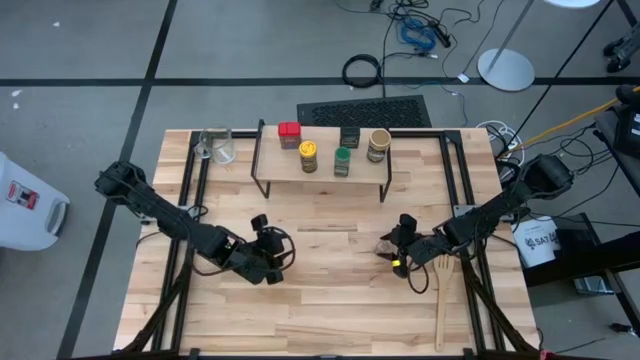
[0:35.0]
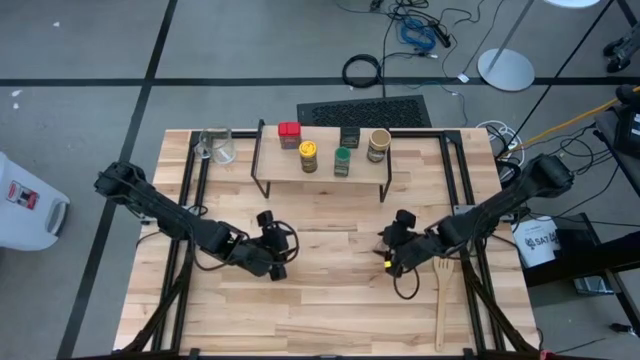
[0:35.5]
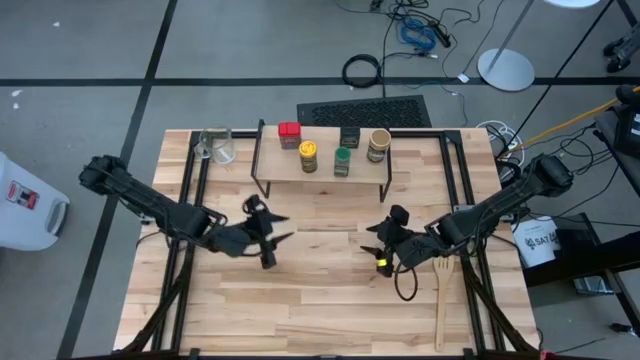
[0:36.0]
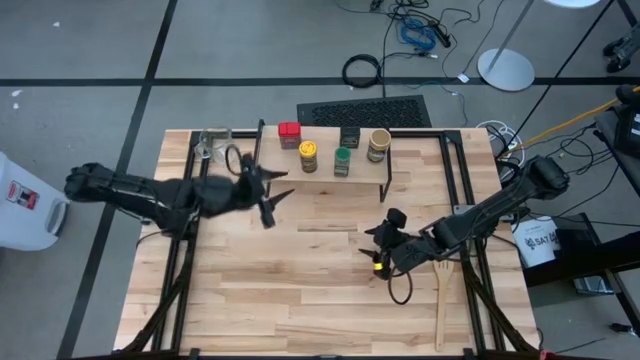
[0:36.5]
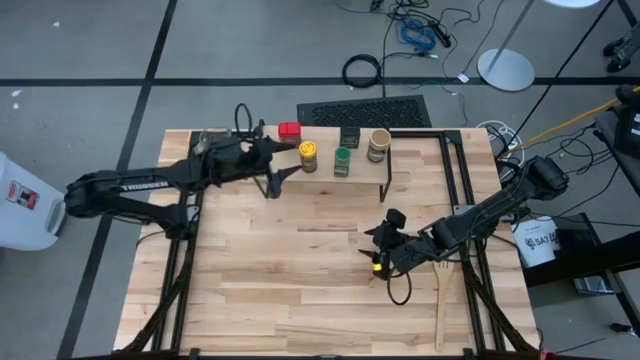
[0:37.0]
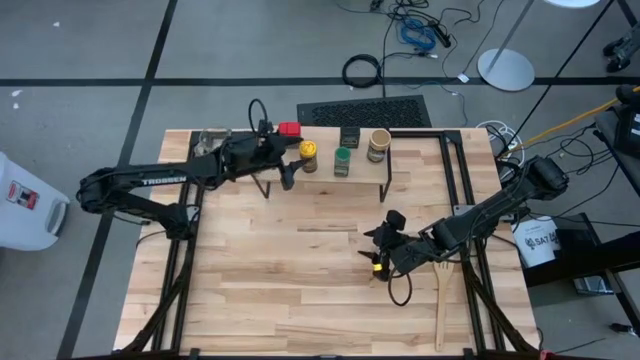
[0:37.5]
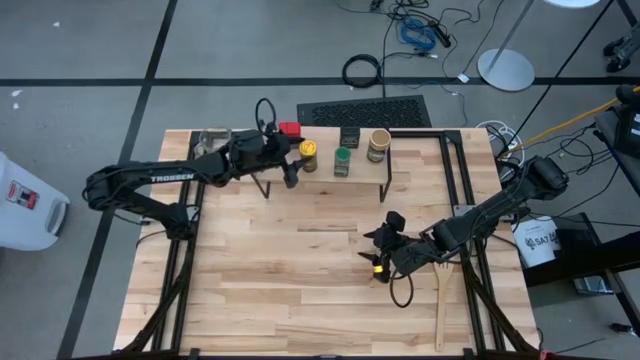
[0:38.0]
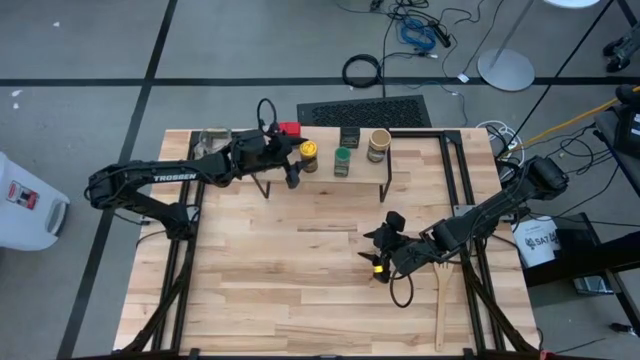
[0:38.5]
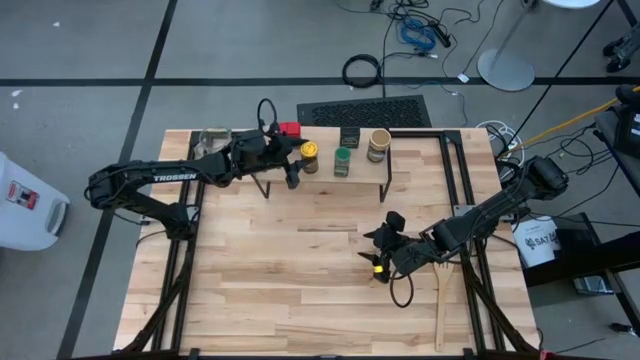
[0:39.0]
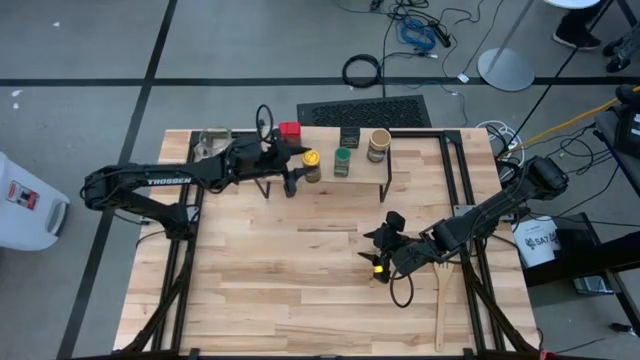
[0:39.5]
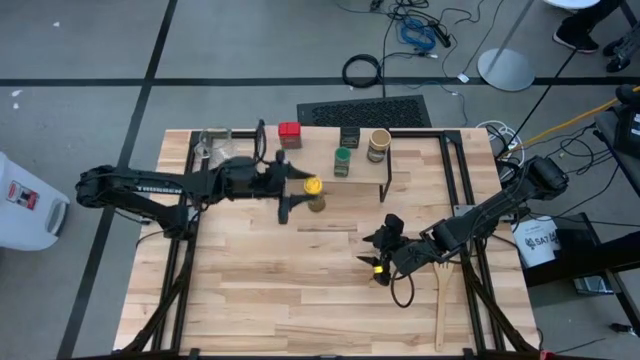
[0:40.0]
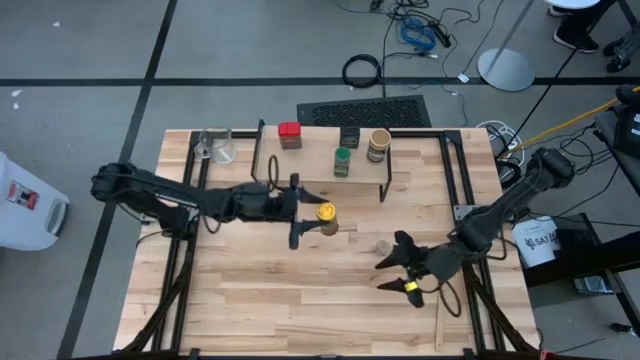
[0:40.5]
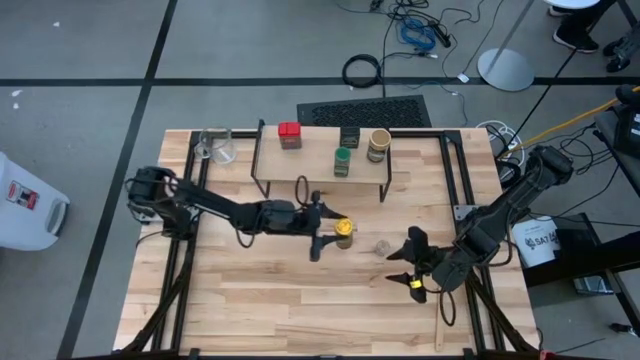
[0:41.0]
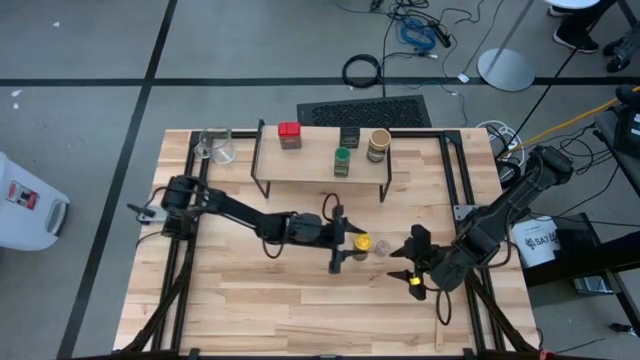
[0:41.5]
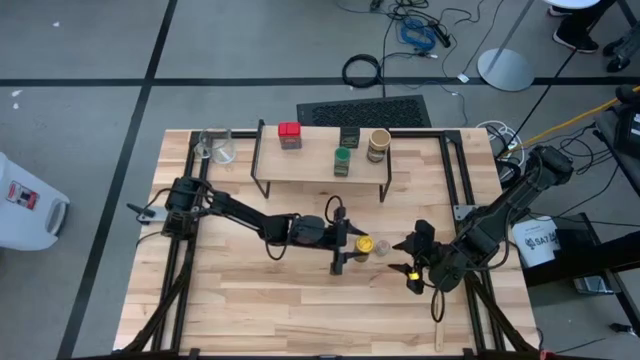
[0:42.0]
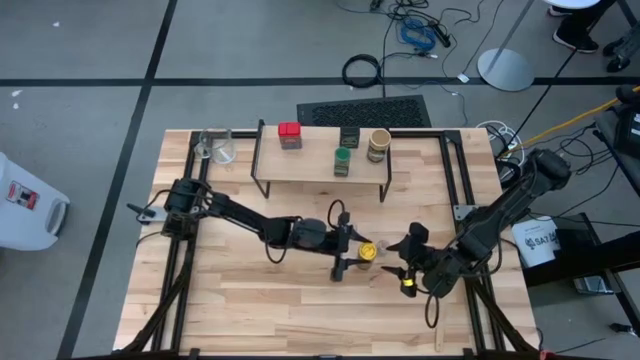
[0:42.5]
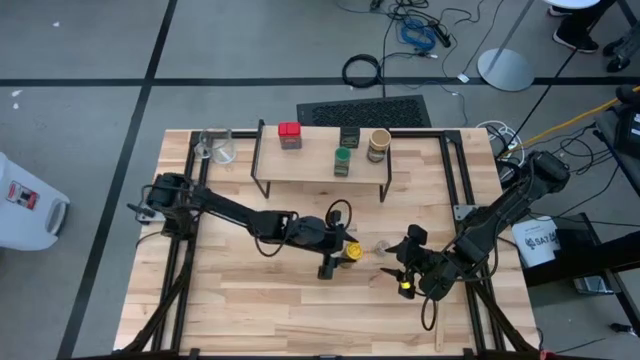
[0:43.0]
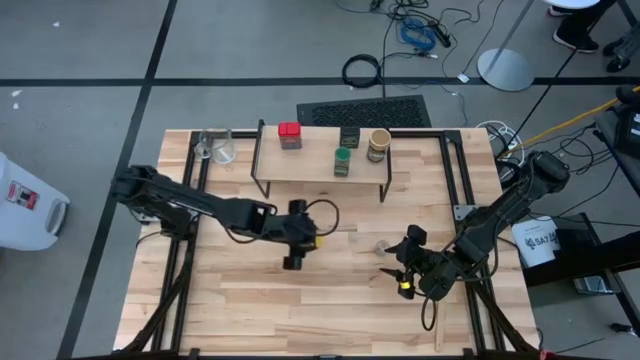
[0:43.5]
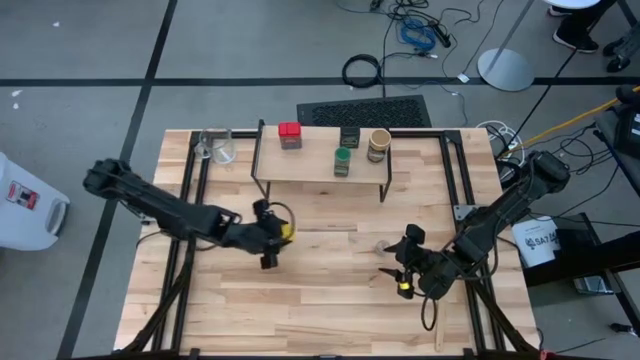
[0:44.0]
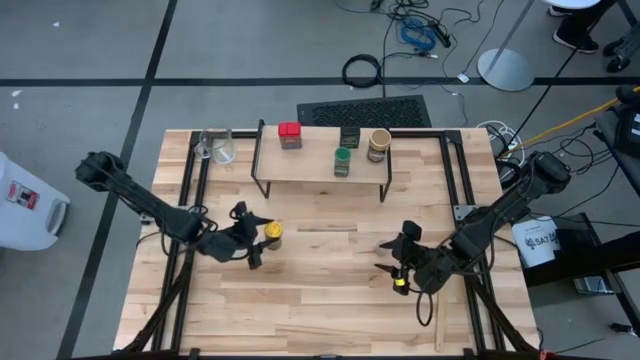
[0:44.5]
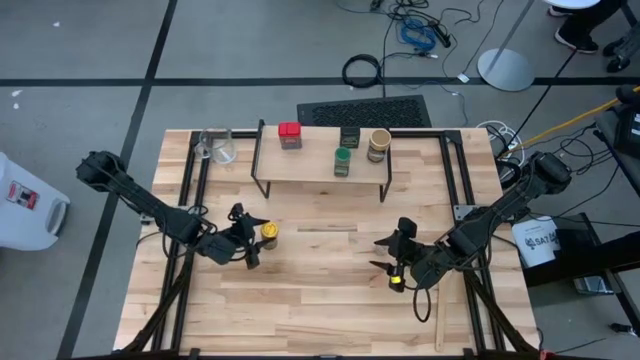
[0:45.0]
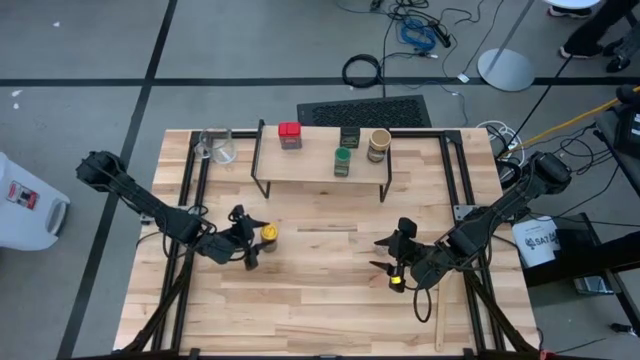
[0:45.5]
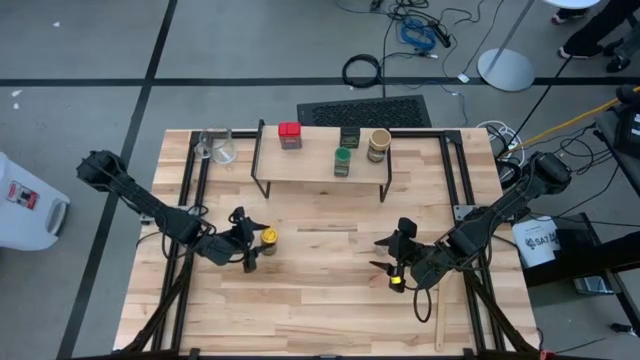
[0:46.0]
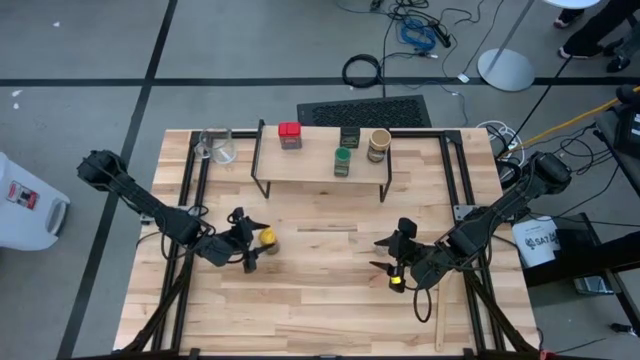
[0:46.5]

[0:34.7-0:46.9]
Task: Shelf spices
Remove the yellow seasoning bottle from the shelf

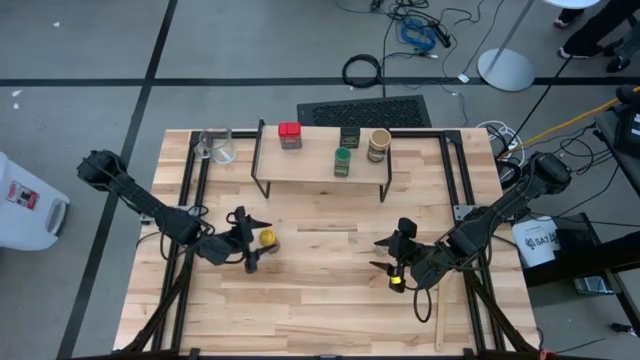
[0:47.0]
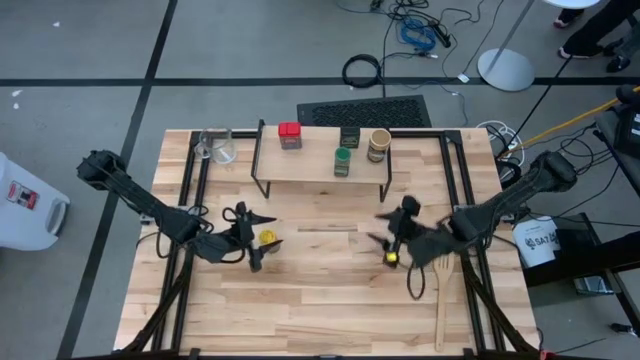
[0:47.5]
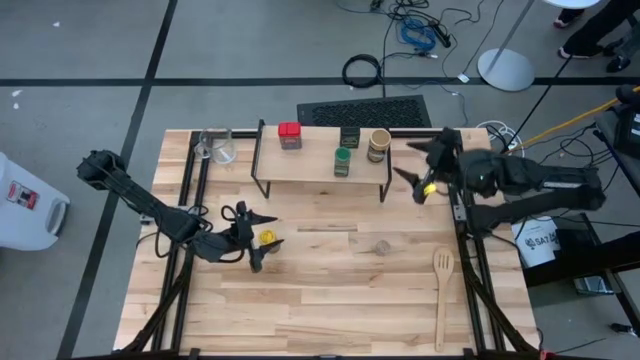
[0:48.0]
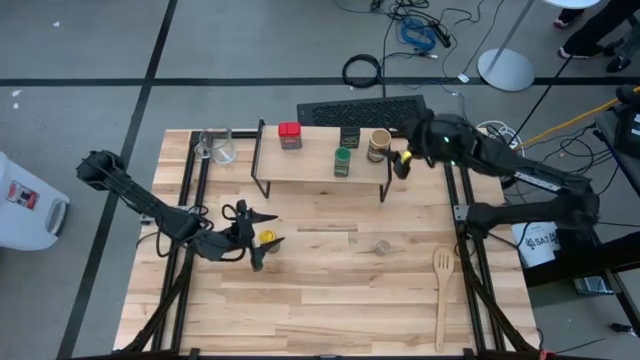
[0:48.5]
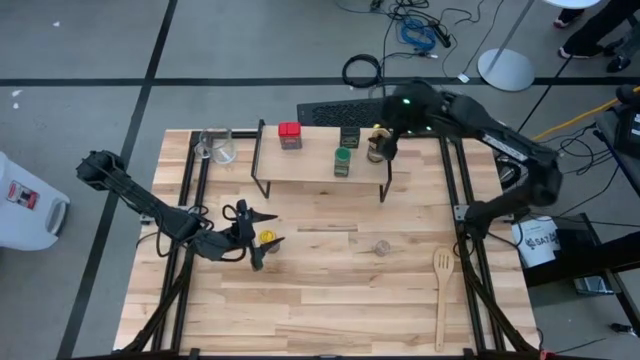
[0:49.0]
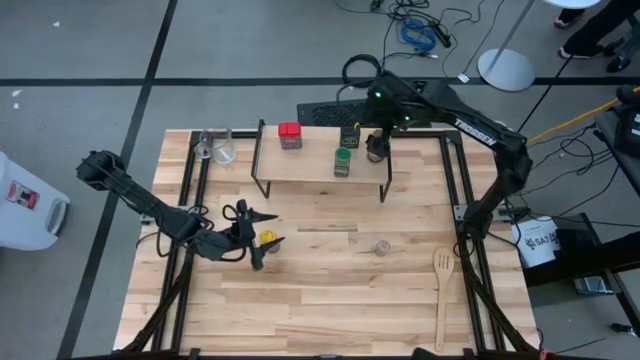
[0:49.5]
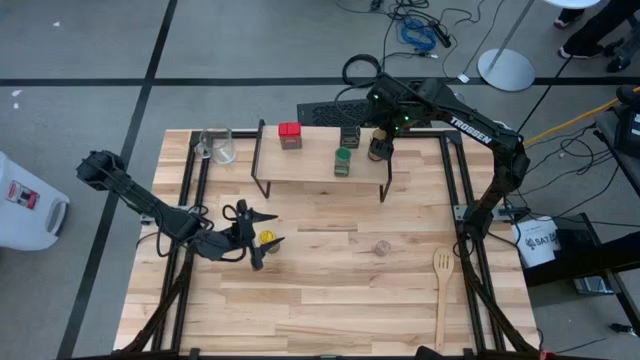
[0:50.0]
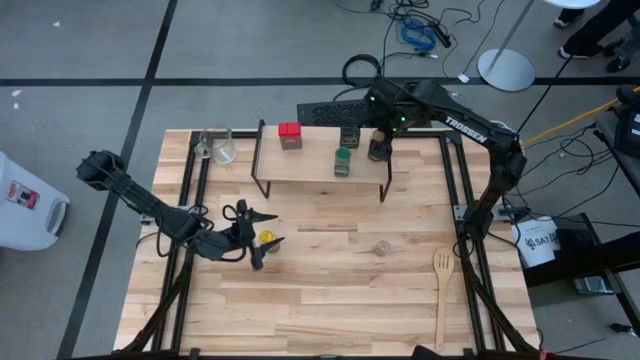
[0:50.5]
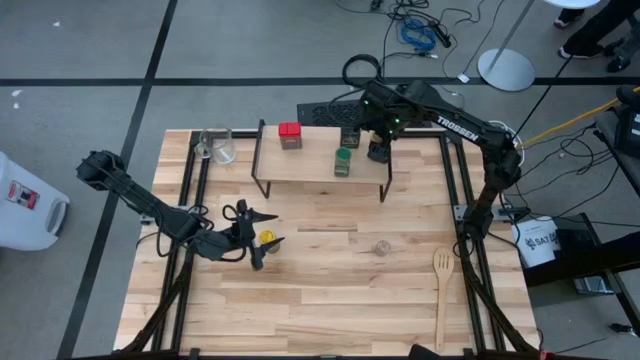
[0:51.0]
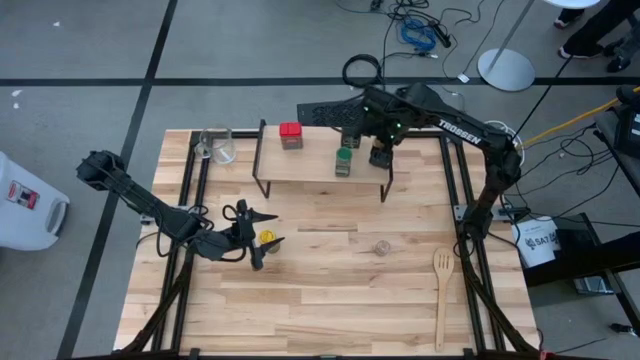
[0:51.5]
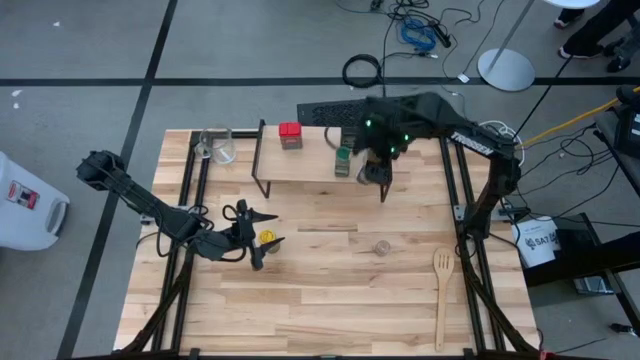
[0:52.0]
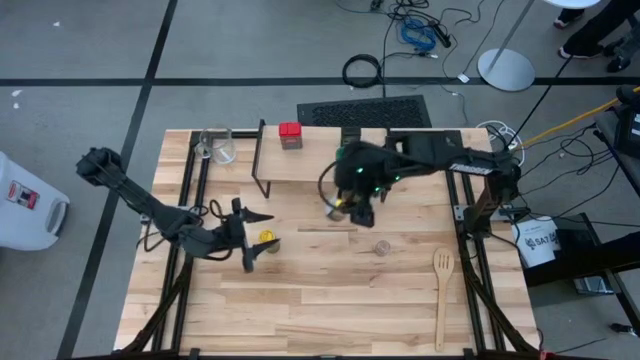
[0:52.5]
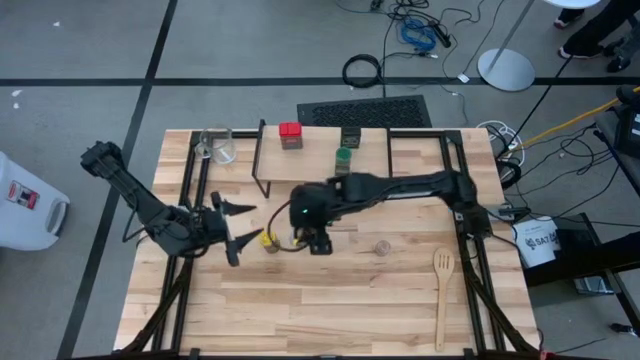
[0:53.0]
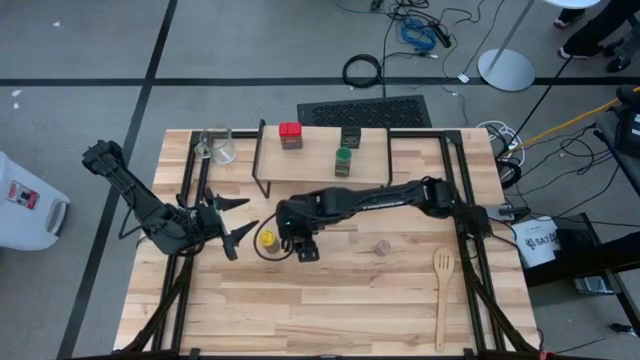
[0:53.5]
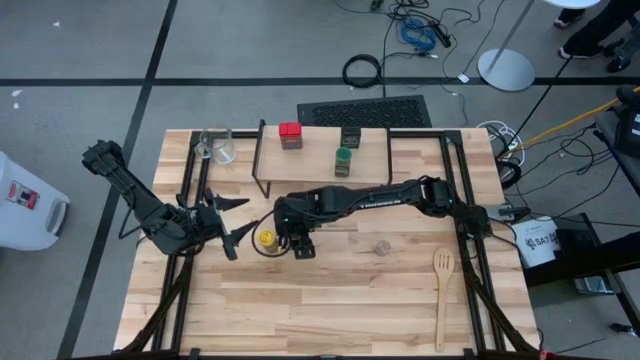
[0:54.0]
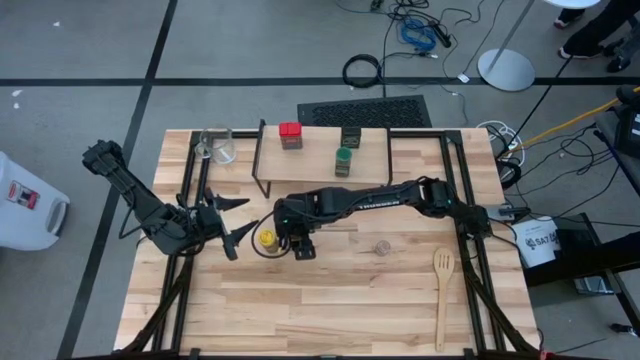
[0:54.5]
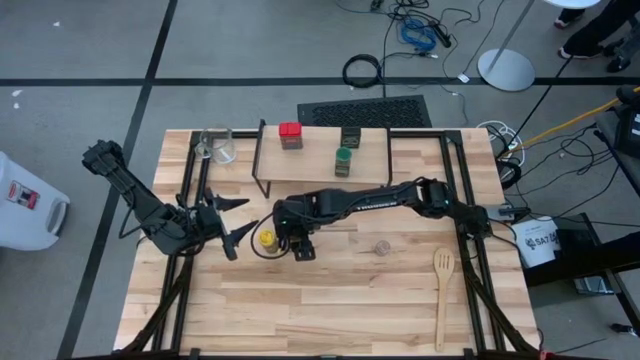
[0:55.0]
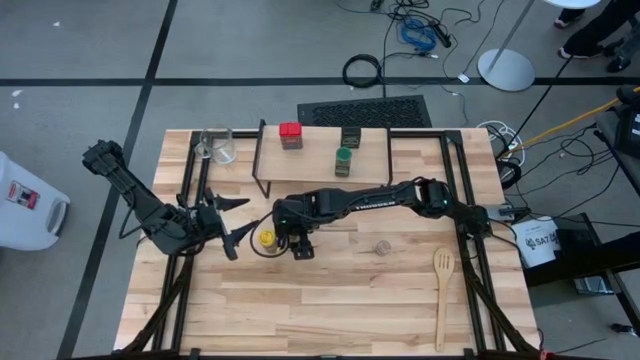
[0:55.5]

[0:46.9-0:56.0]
Remove the gold seasoning bottle from the shelf
